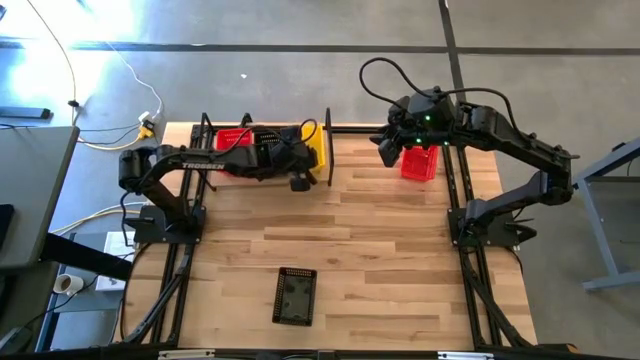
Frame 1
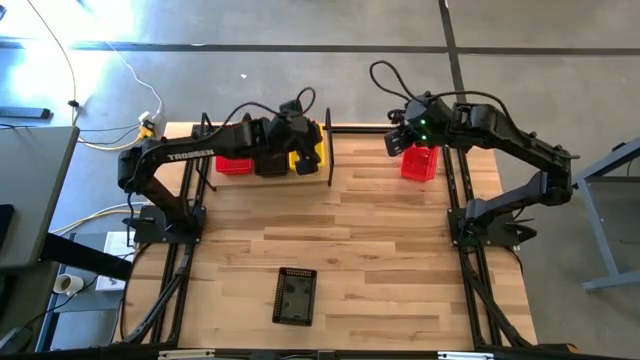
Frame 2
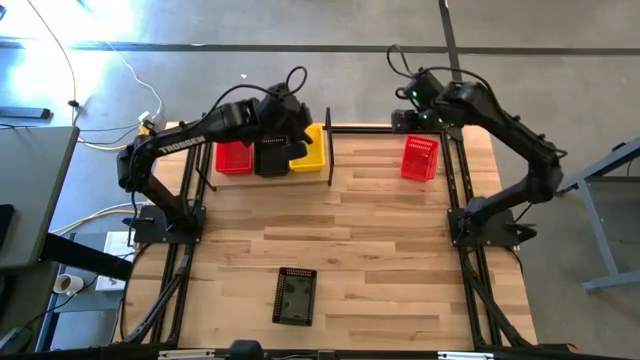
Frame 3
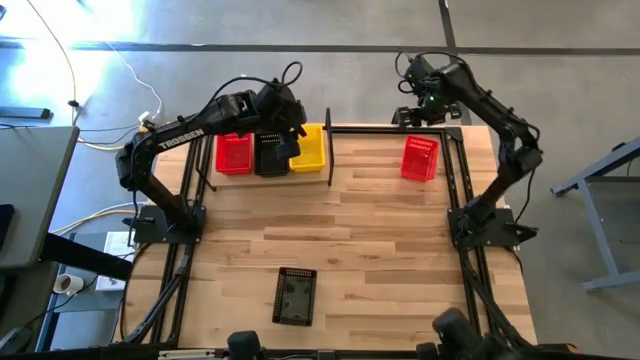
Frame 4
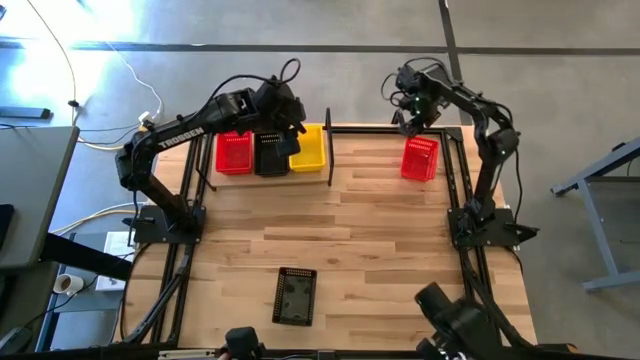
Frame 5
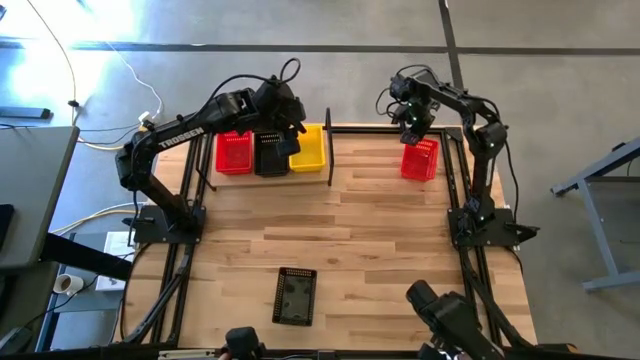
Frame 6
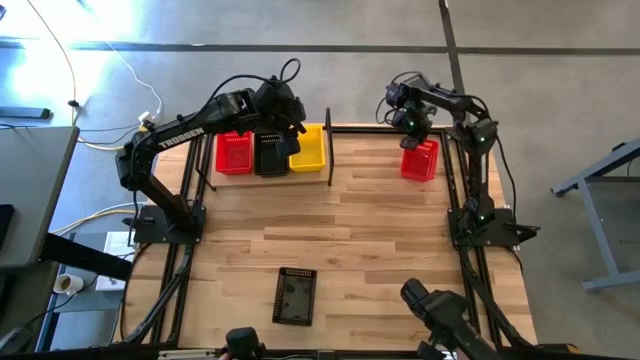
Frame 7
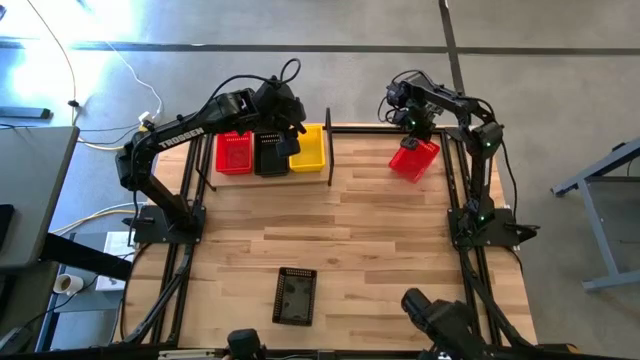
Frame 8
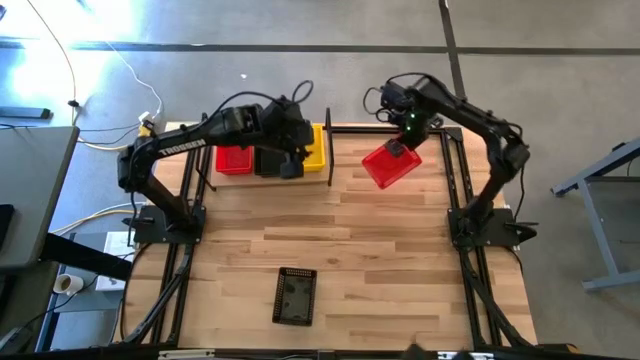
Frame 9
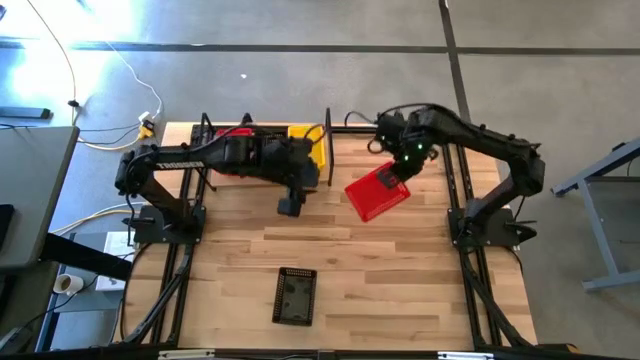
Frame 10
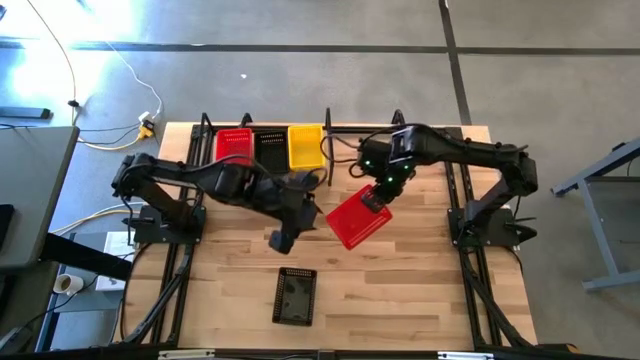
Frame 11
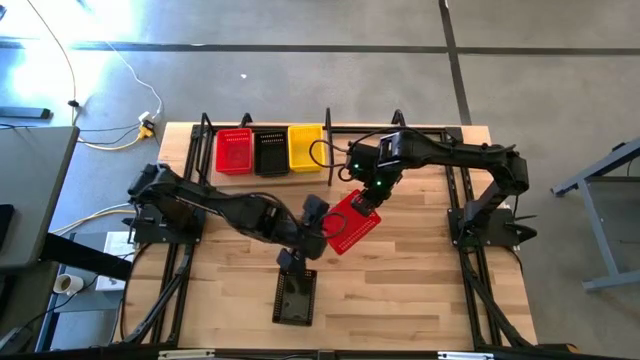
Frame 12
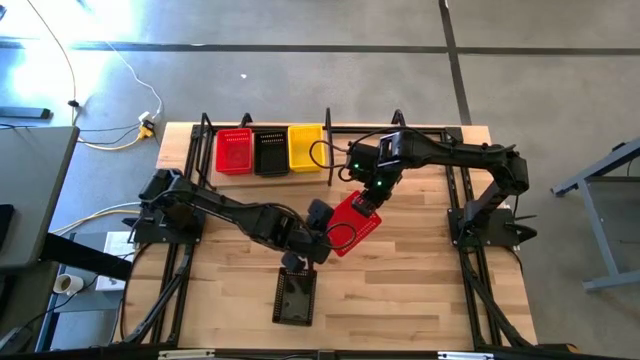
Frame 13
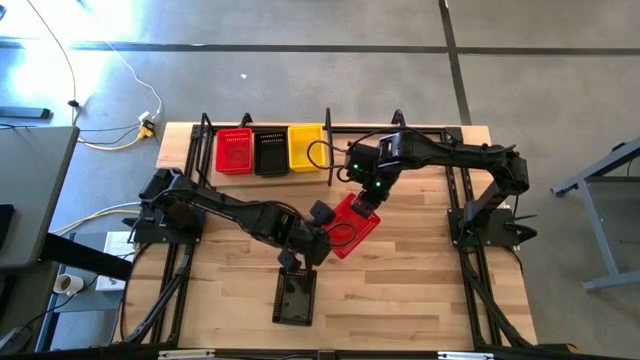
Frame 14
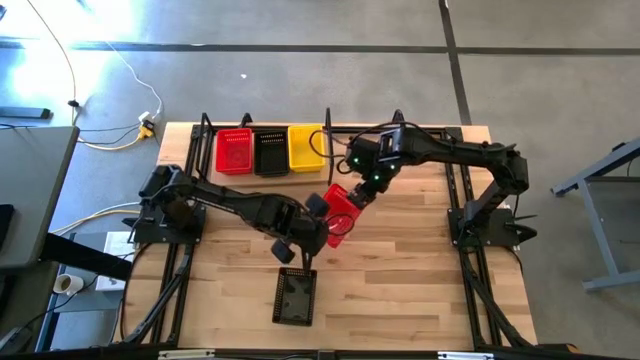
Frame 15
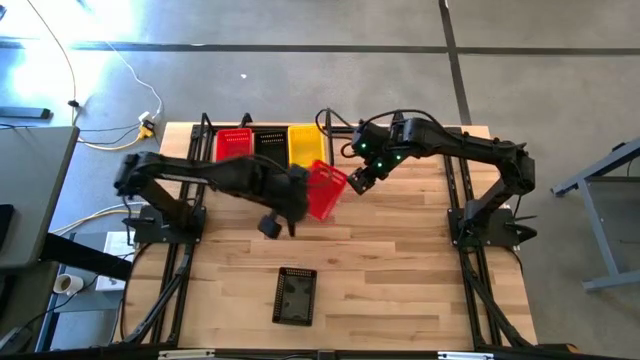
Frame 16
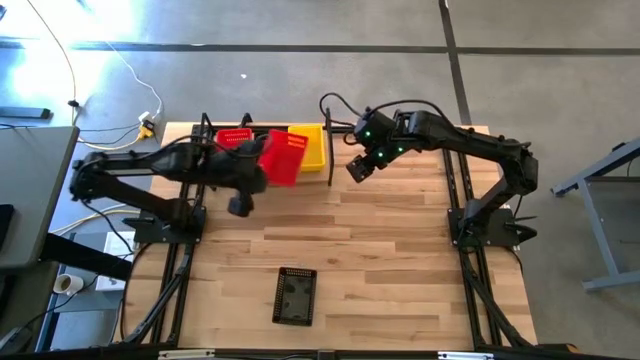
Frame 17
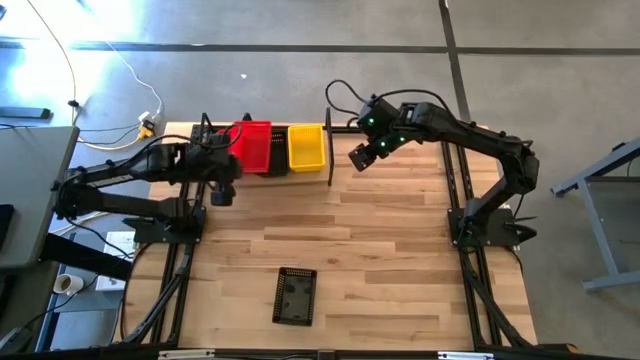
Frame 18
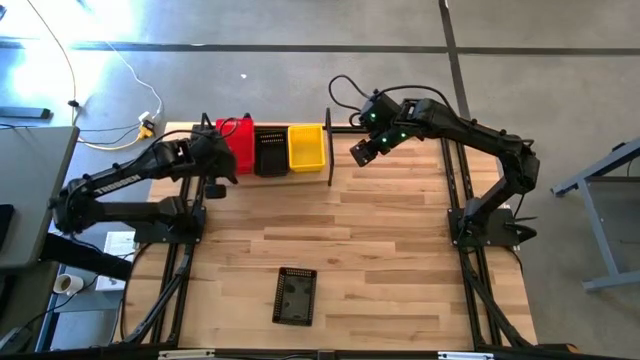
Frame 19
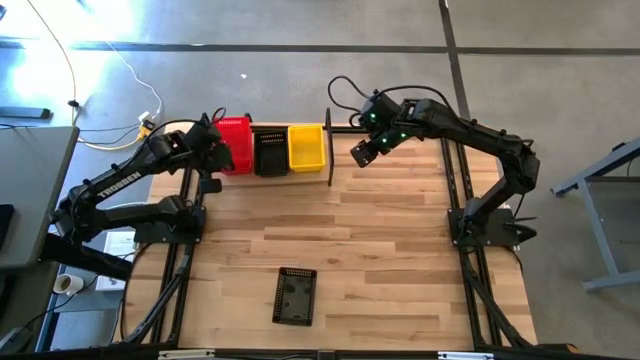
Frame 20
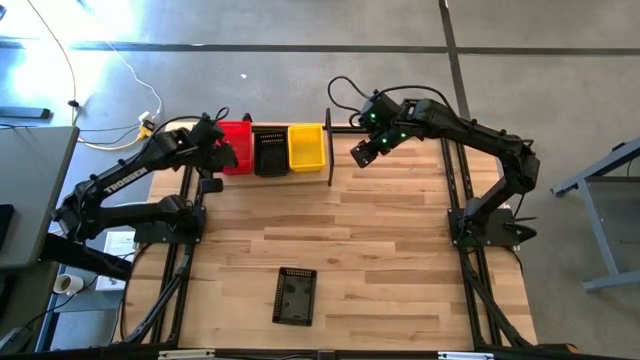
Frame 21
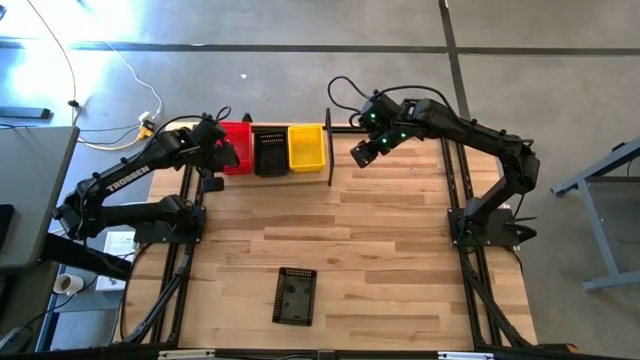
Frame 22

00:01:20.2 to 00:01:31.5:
Task: Stack baskets on shelf by color
Stack the red bin on top of the red bin

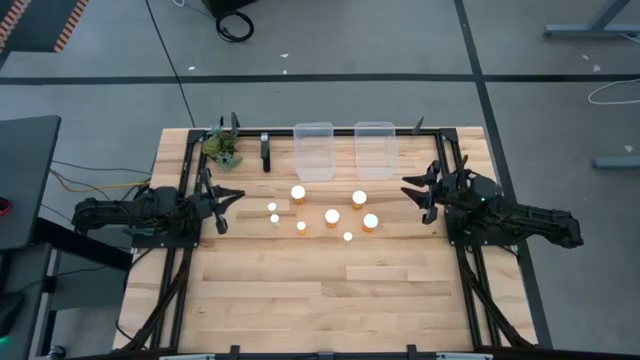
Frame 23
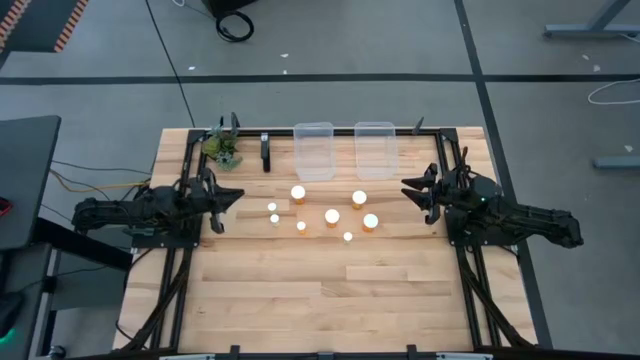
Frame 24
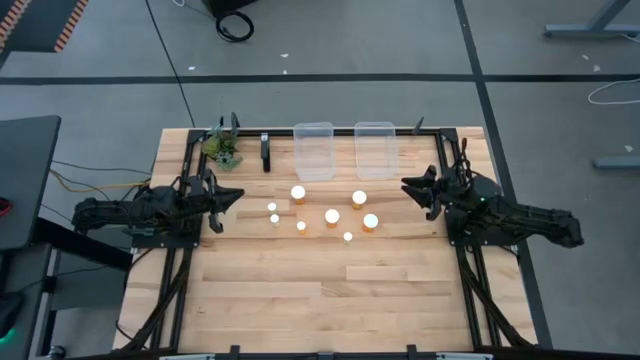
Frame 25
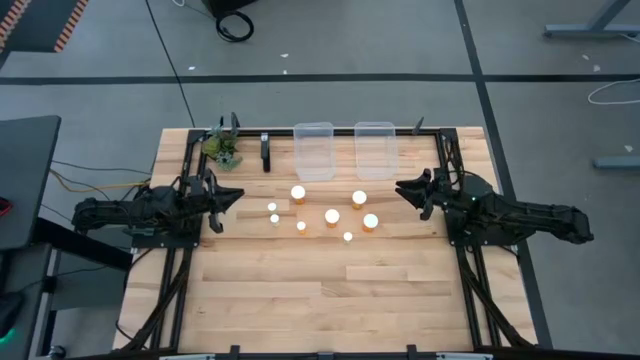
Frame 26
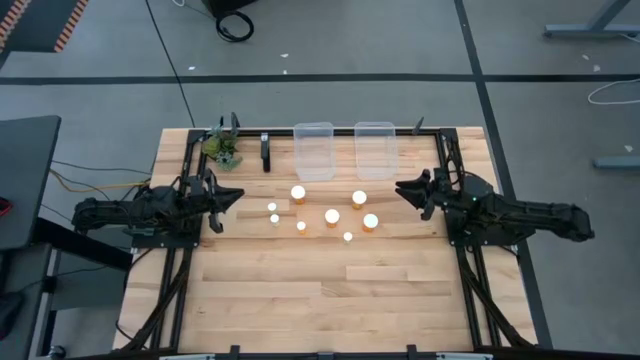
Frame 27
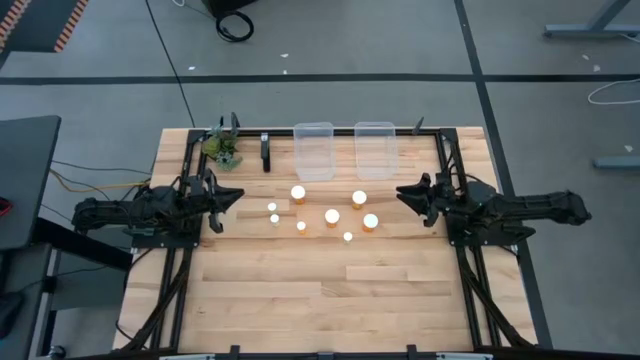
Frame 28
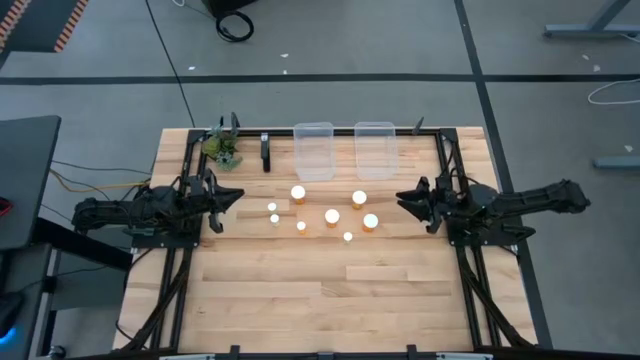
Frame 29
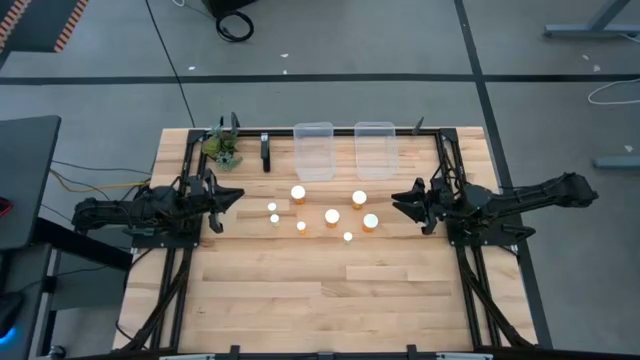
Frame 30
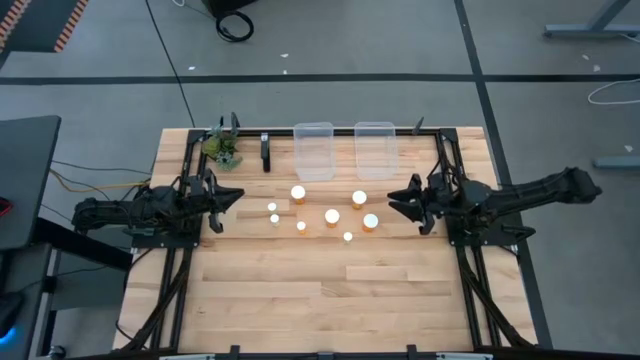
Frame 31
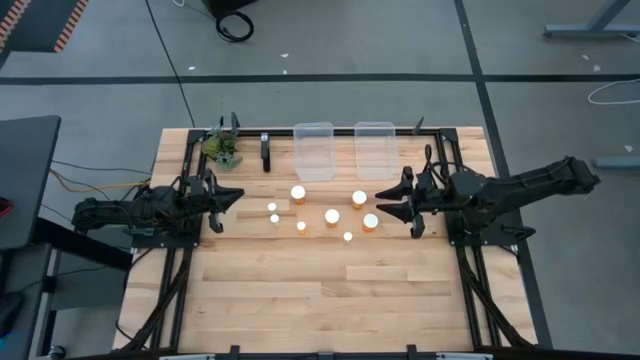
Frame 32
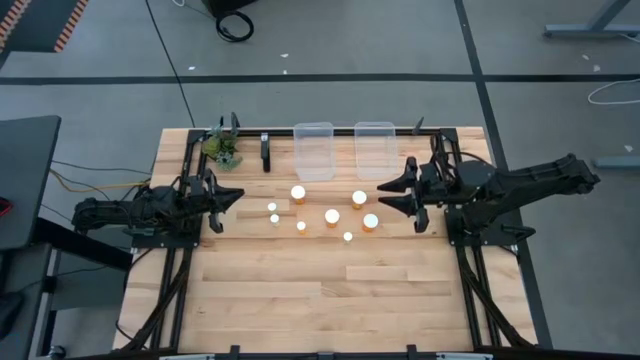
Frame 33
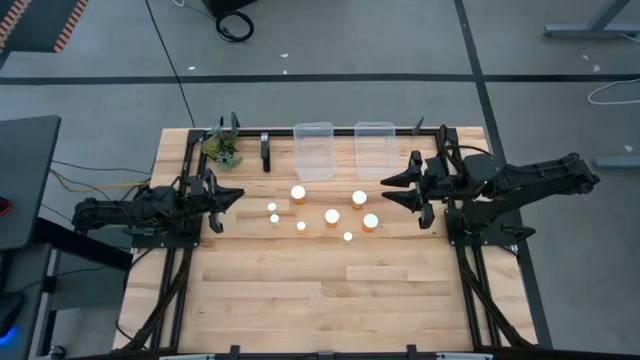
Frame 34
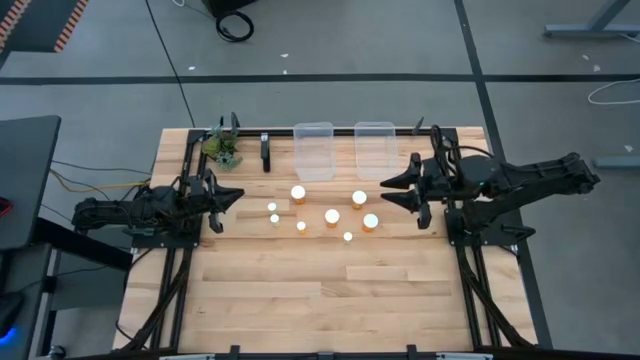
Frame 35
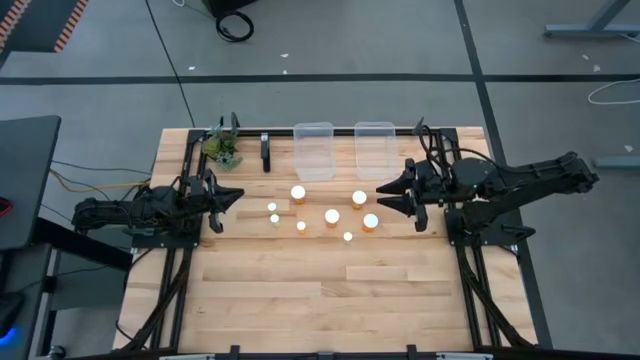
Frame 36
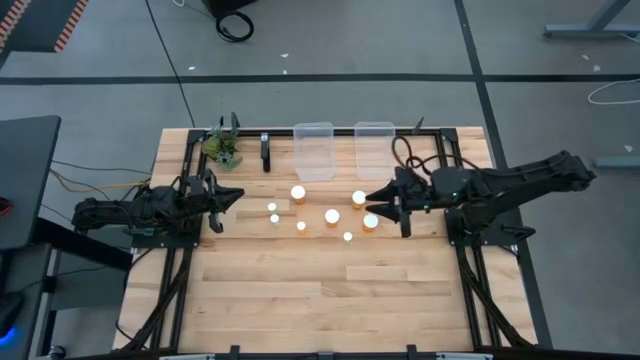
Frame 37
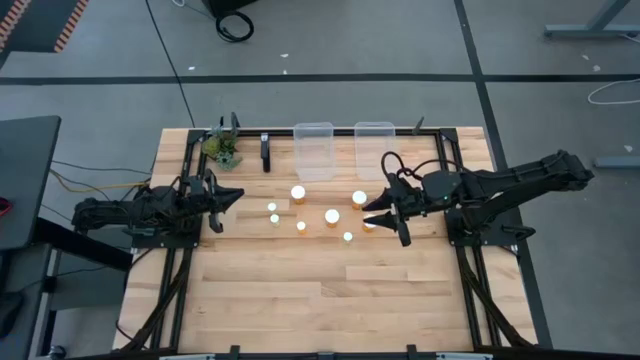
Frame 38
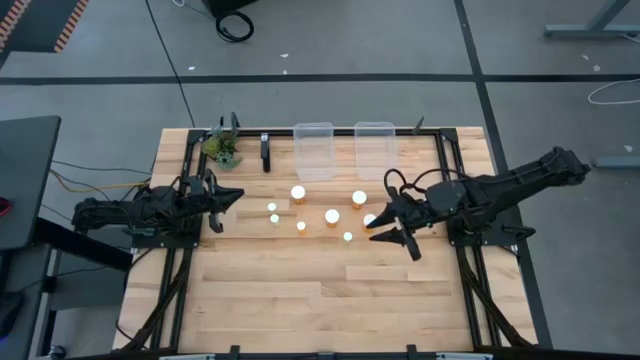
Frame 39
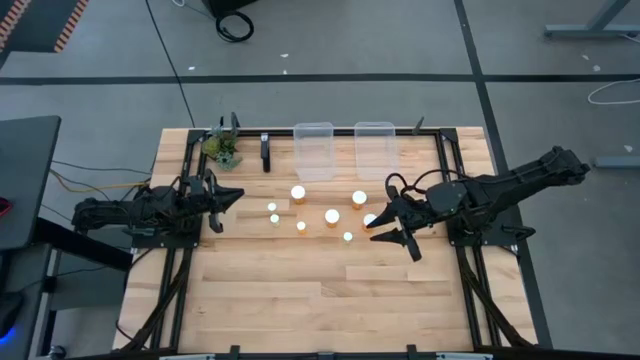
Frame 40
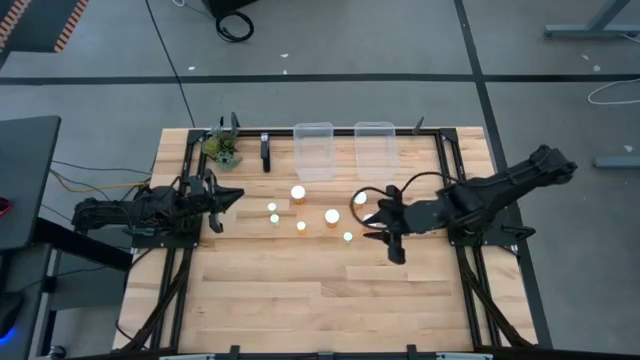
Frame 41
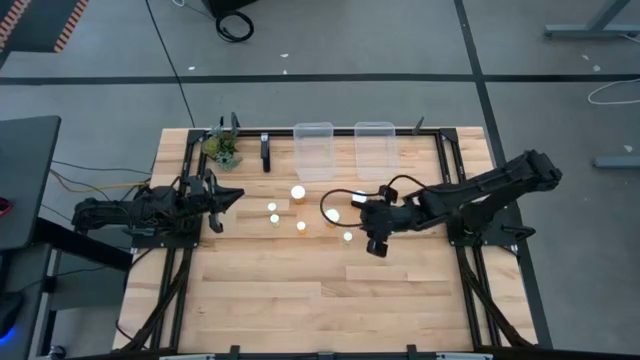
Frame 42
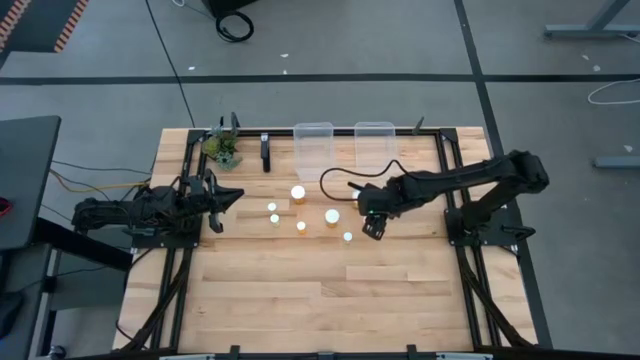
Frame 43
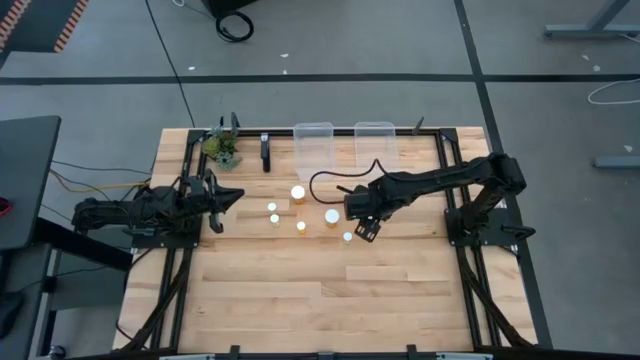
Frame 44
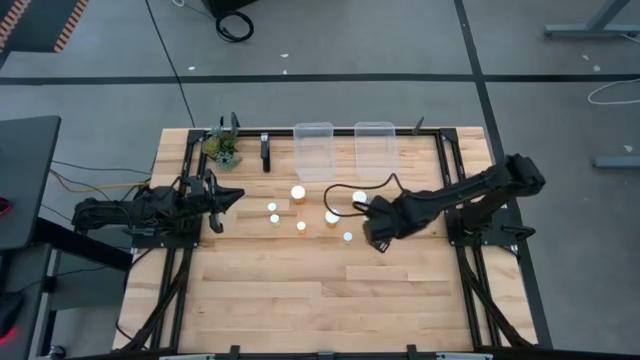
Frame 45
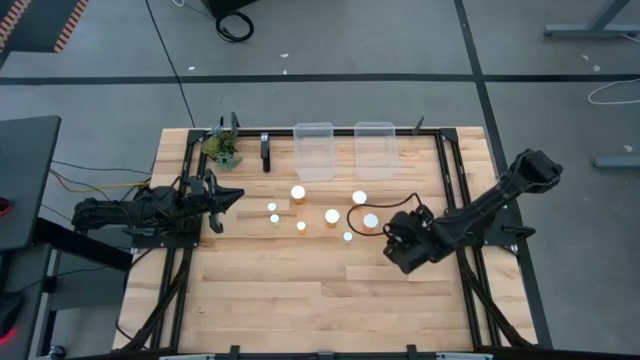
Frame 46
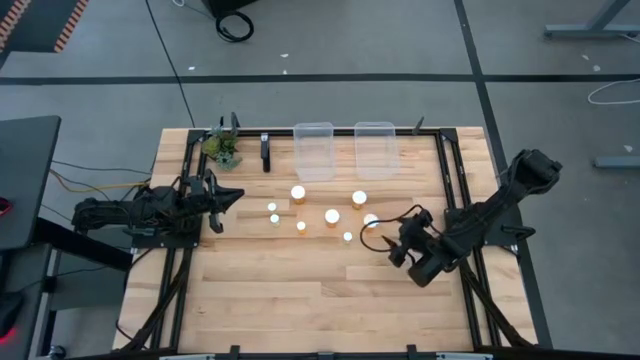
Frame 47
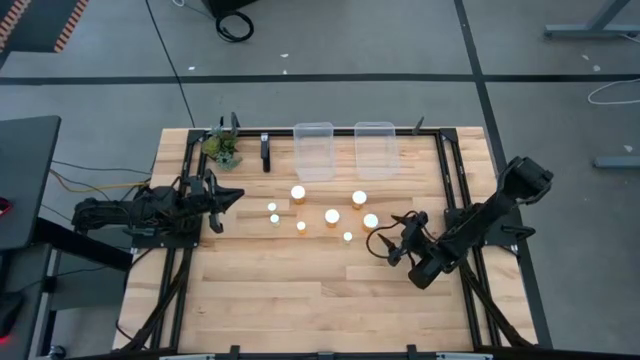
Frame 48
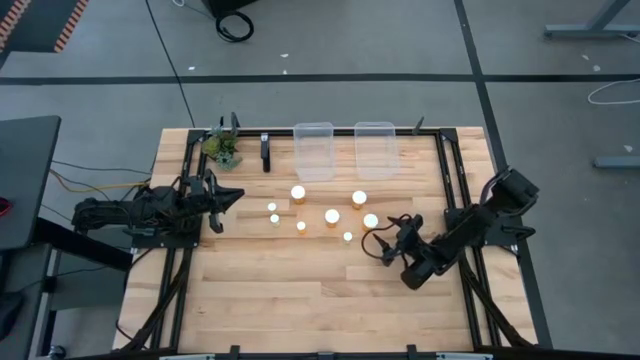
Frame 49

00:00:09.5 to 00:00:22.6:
Task: Pick and place medicine bottles into bin by pill shape (circle, oval)
Put the bottom right big orange pill into the right transparent bin
